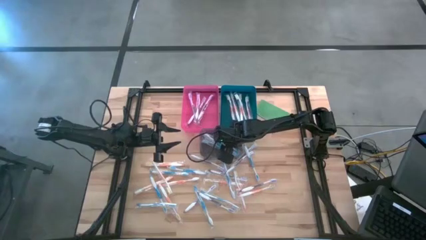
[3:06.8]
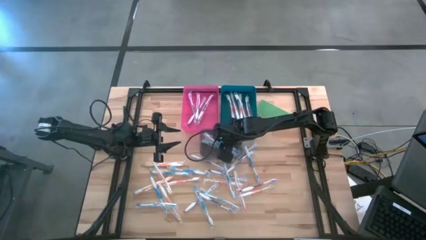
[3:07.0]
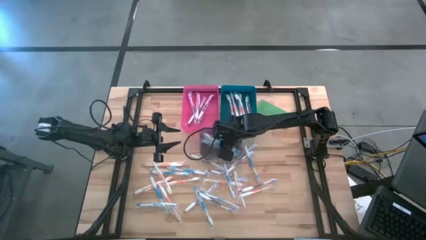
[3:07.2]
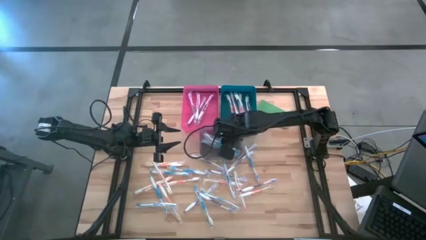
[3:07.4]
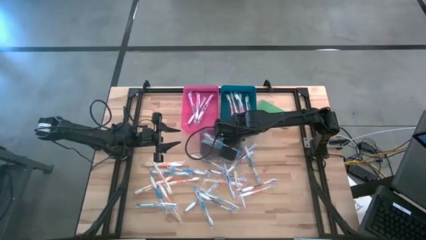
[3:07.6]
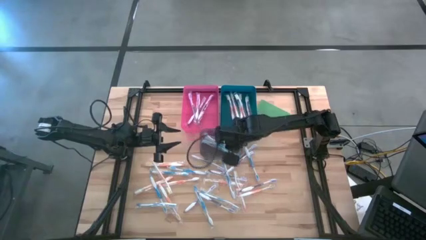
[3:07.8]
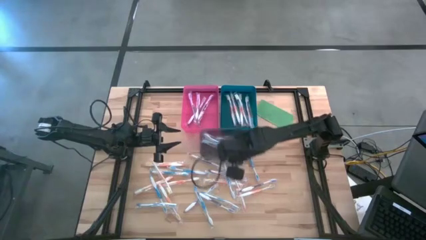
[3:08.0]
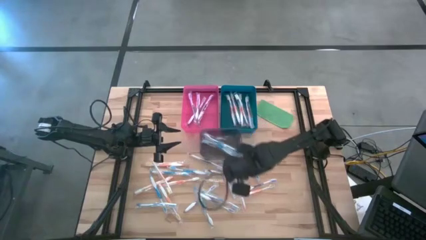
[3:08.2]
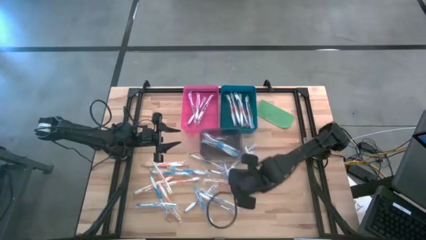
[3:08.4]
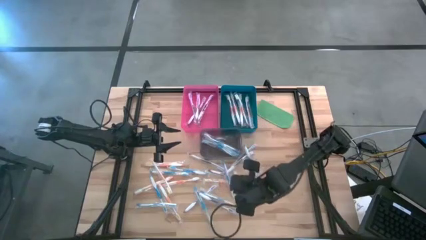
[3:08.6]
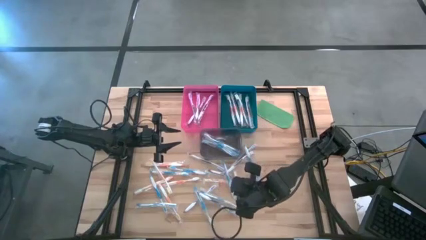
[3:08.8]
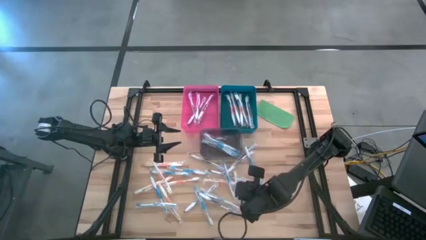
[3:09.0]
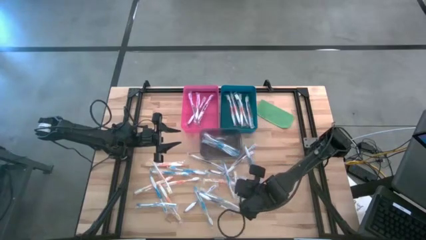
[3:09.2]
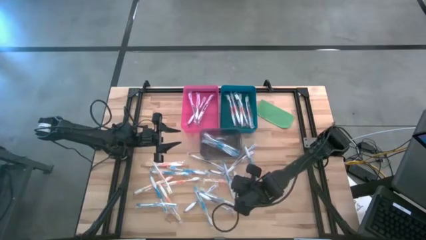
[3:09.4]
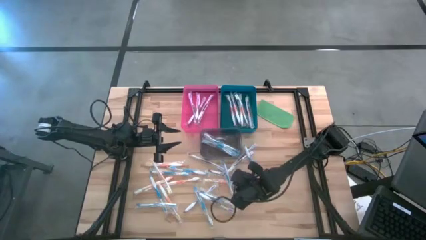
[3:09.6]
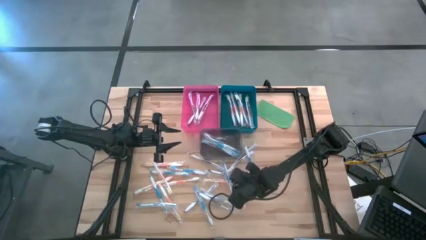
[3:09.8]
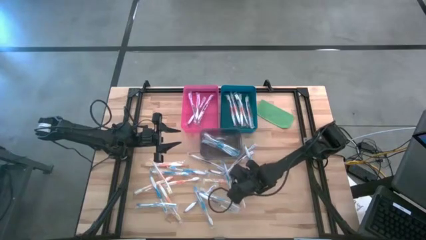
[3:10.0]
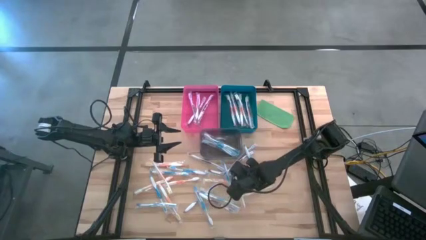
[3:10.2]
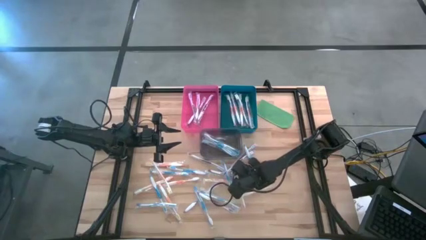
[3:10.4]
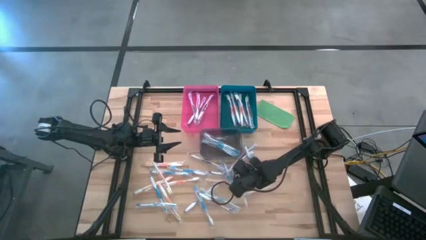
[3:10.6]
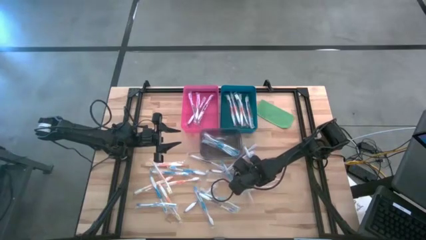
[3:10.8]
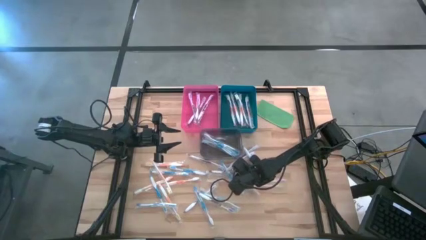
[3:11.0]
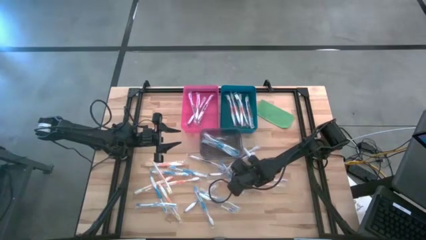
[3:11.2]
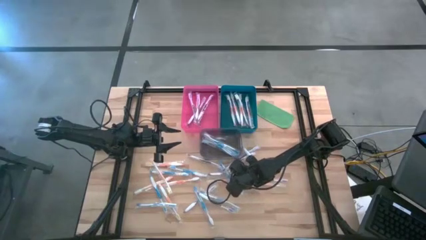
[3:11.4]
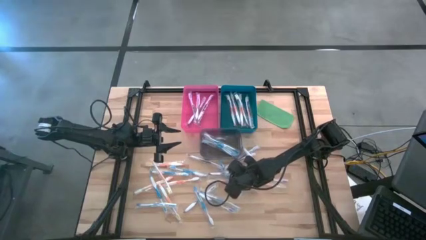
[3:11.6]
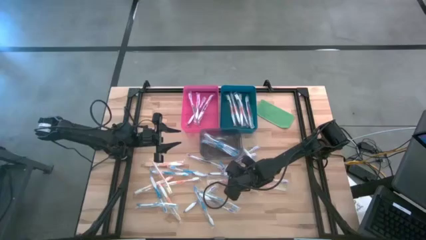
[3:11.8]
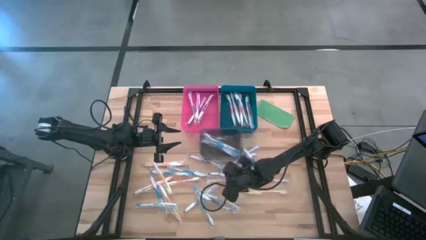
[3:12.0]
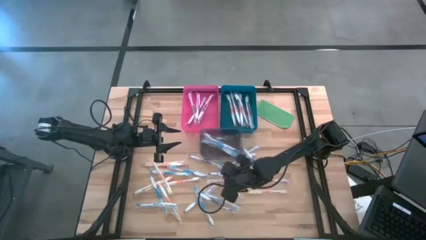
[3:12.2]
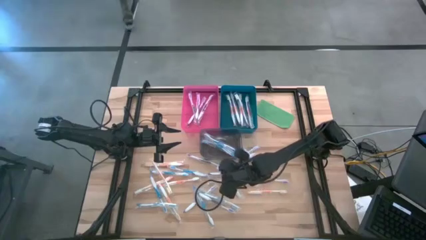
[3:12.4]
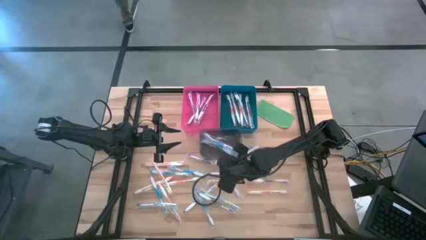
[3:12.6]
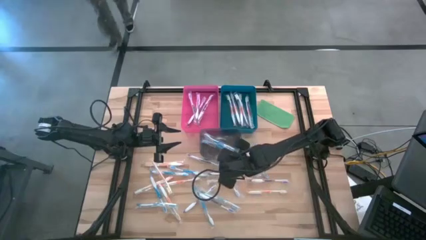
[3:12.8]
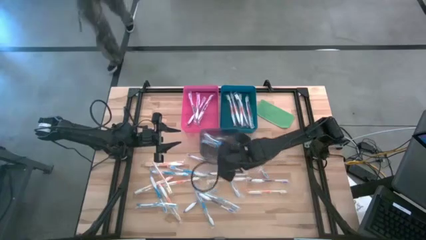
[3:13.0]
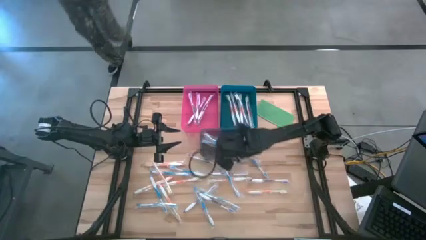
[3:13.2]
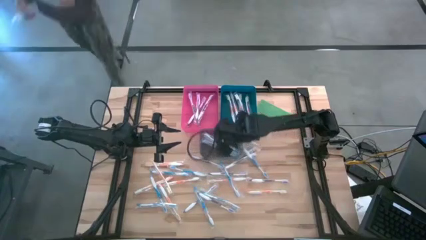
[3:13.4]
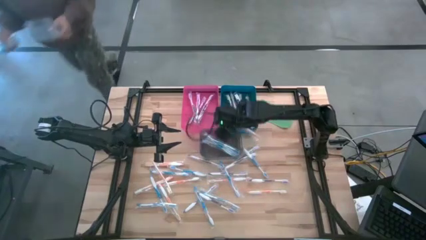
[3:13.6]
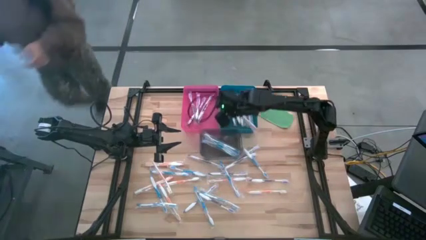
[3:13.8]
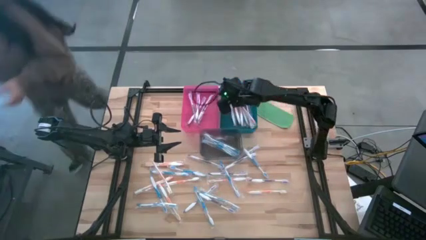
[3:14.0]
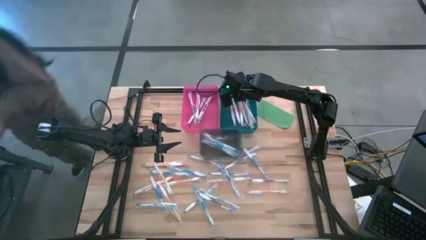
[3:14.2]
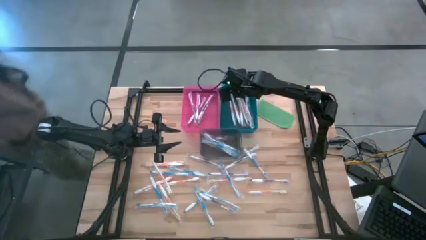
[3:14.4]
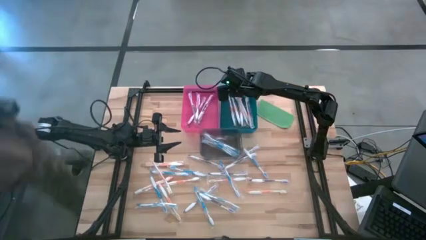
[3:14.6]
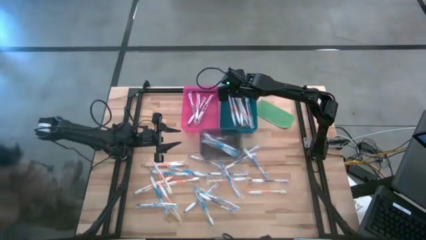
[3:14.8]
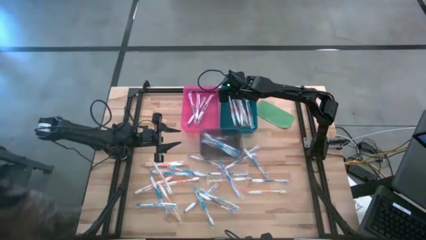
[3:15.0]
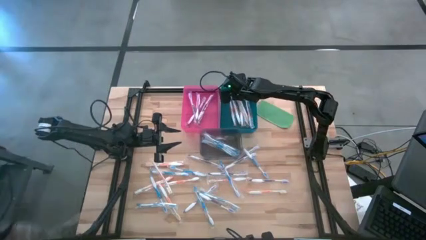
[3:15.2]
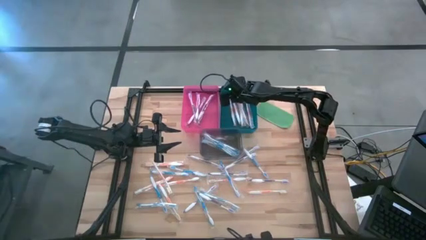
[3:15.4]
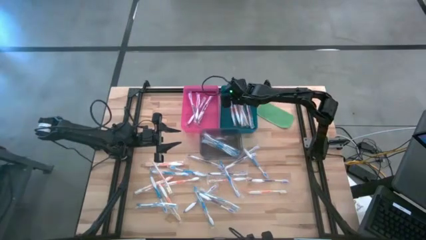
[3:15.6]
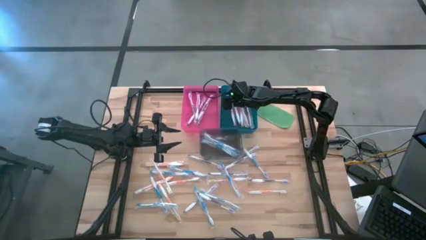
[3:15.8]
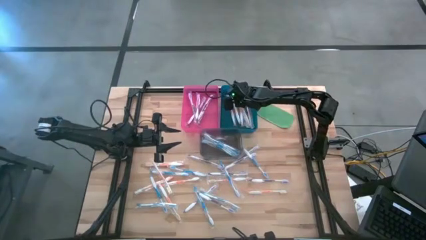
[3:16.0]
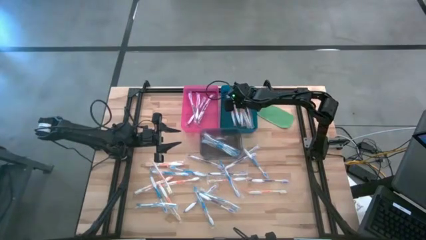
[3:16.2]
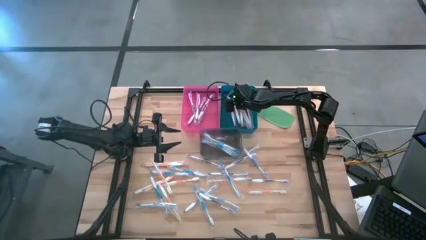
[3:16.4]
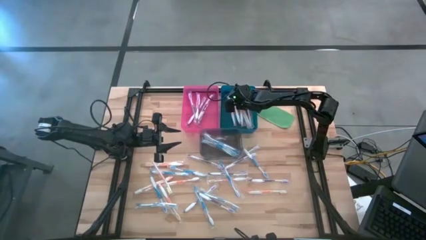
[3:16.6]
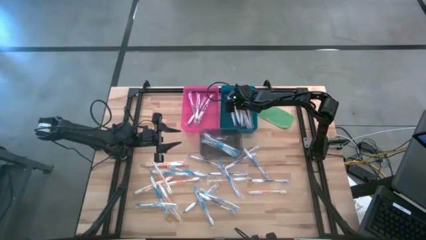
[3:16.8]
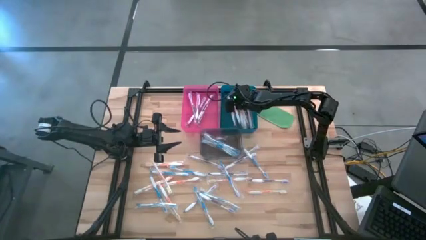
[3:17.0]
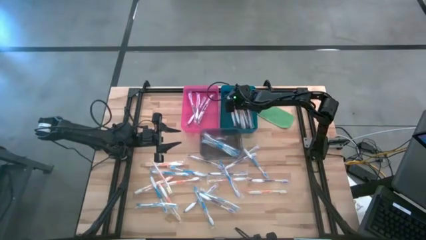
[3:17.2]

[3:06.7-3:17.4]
Task: Pick & Place Toothbrushes
Put the orange toothbrush into the blue bin

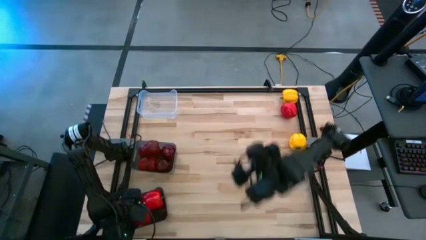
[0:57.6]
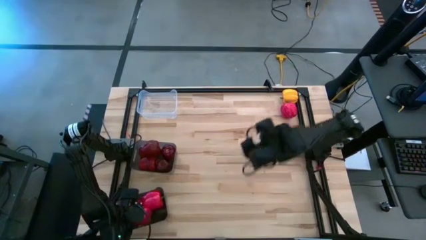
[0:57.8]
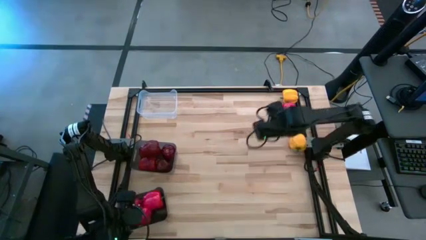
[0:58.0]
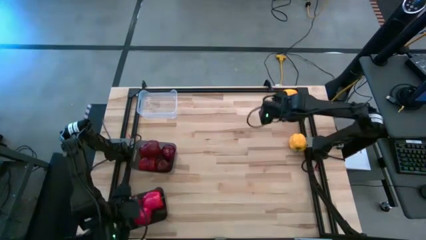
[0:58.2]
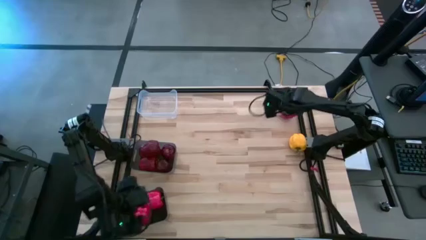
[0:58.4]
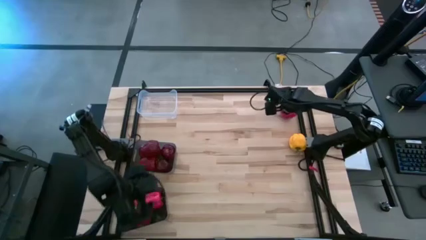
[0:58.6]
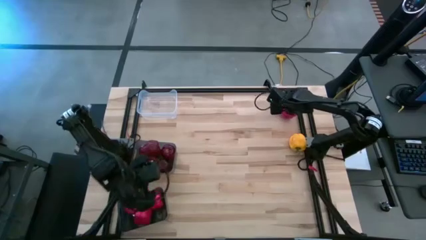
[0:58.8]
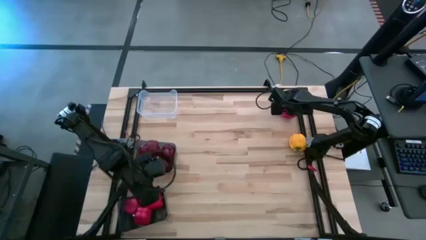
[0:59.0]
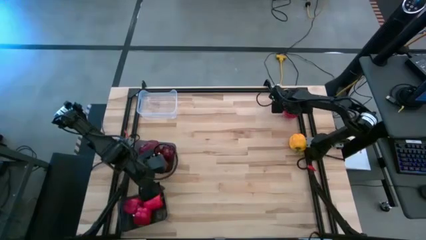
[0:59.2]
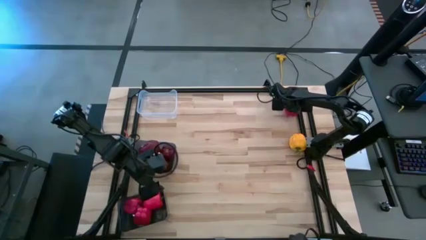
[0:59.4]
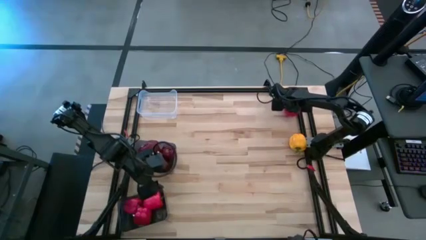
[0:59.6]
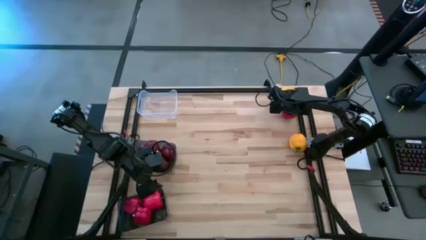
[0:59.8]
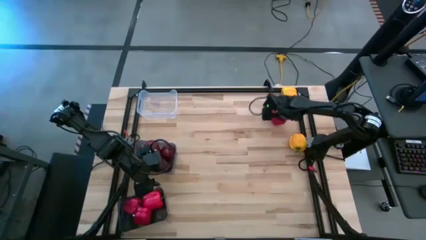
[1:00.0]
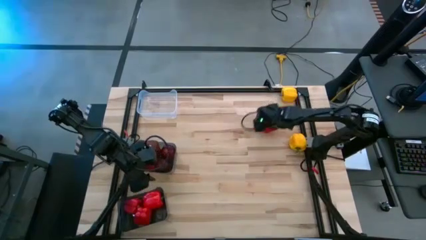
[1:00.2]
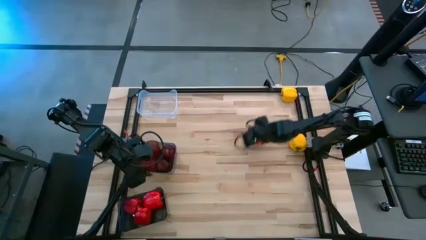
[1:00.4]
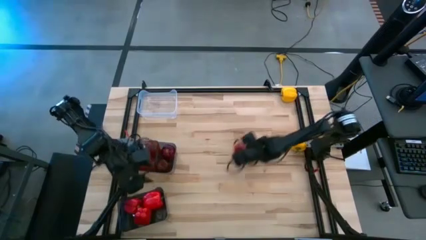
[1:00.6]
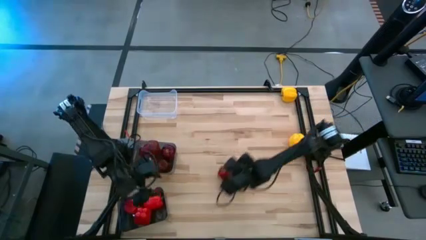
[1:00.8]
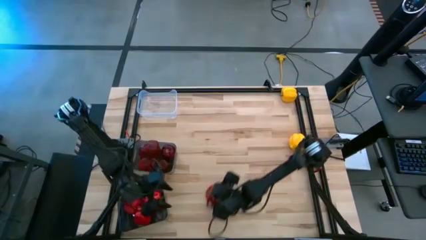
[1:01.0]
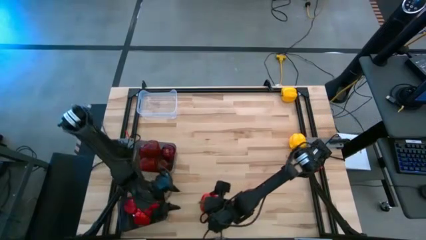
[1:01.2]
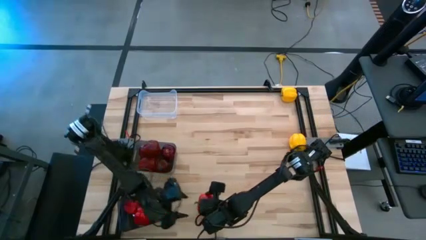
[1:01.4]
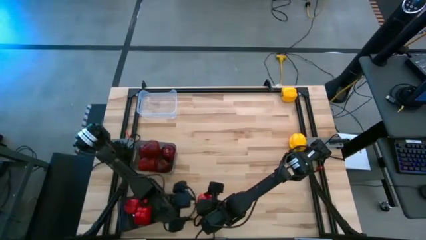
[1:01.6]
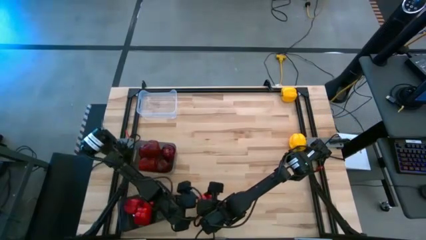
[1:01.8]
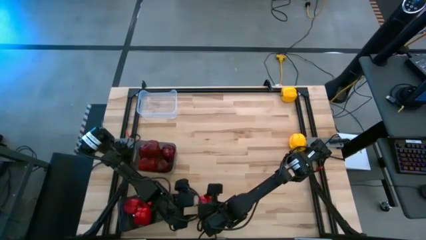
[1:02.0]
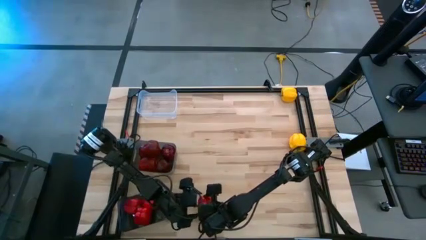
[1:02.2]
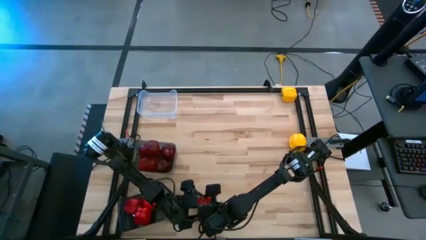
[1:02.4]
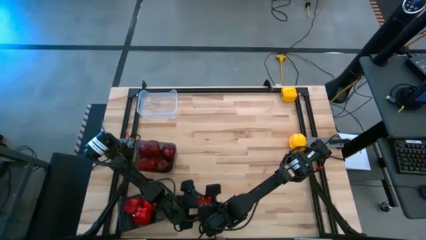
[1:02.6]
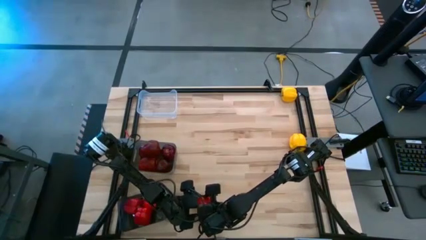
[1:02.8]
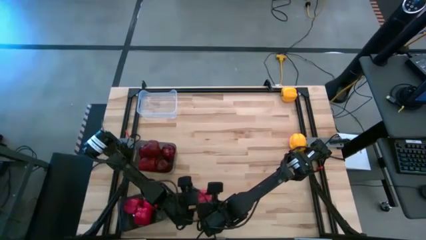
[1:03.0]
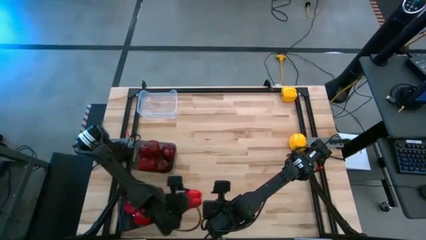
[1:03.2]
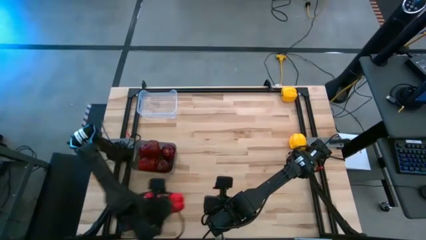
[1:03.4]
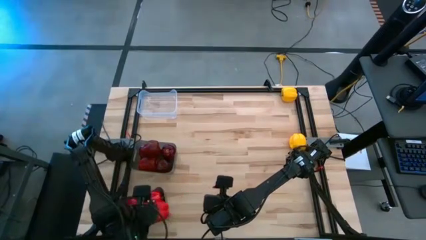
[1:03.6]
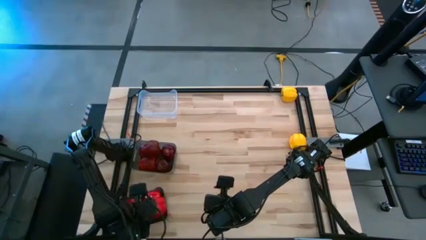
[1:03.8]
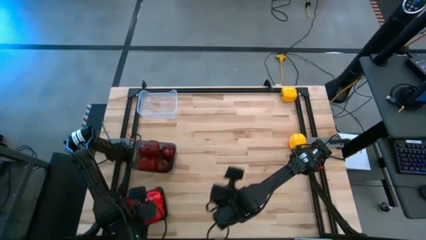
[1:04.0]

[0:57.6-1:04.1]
Task: Sort produce into baskets
Put the red bell pepper into the bottom black bin
